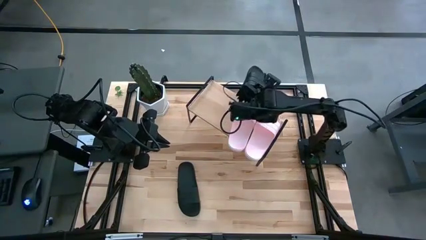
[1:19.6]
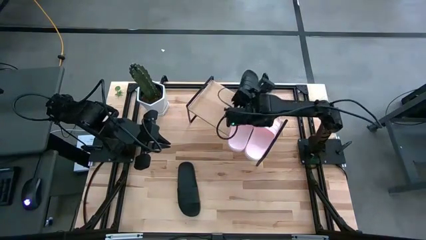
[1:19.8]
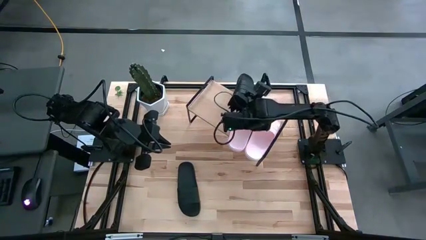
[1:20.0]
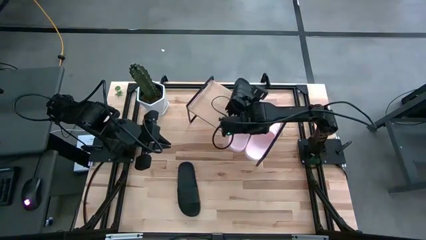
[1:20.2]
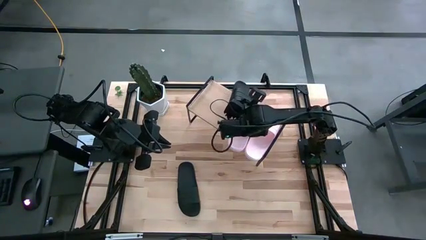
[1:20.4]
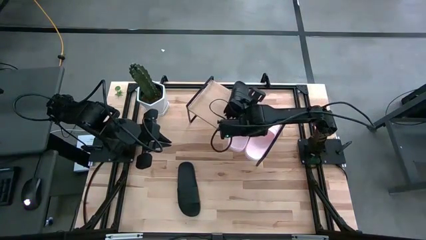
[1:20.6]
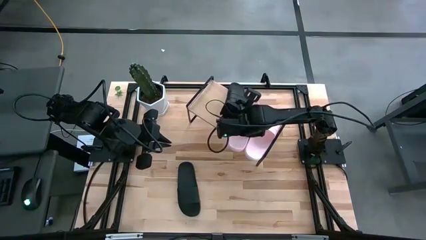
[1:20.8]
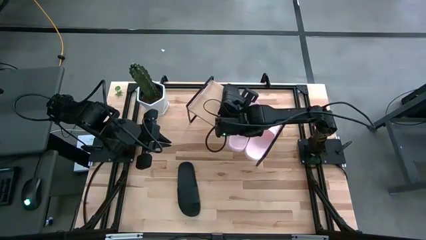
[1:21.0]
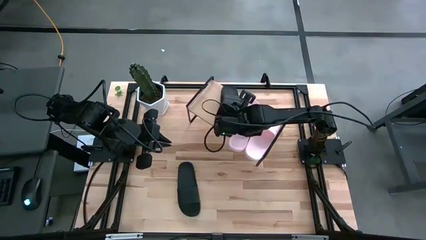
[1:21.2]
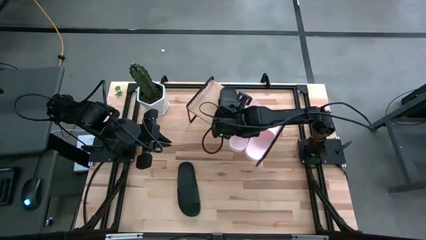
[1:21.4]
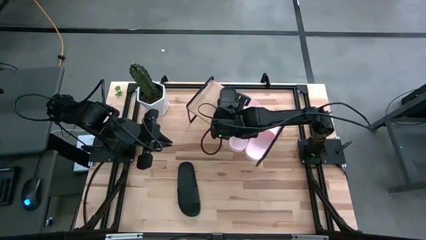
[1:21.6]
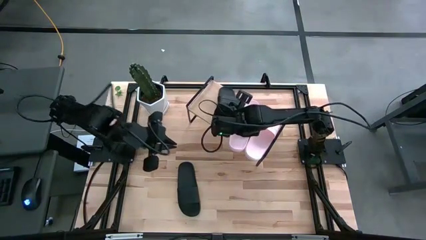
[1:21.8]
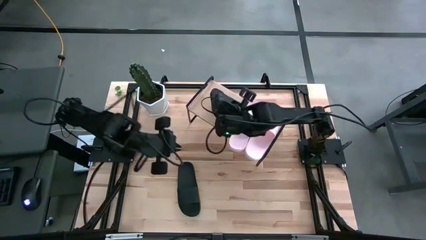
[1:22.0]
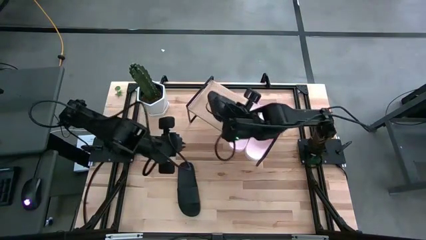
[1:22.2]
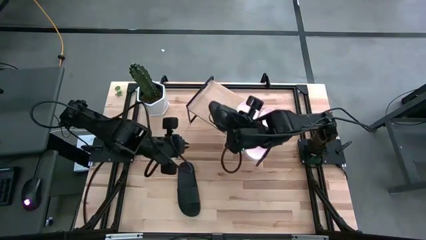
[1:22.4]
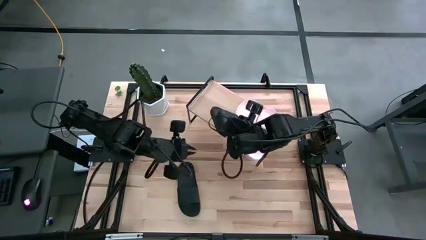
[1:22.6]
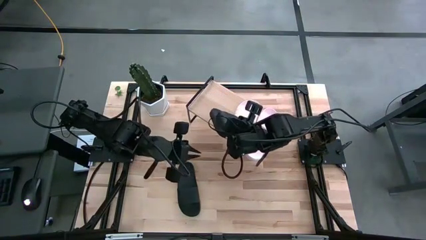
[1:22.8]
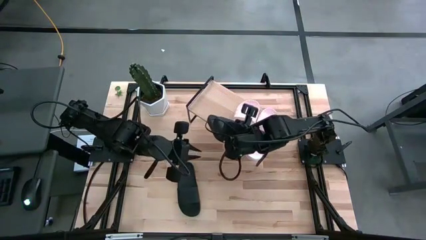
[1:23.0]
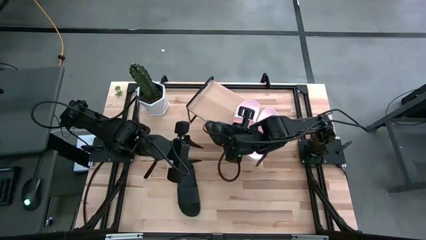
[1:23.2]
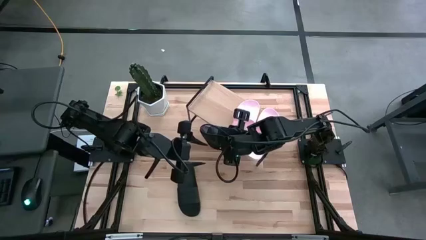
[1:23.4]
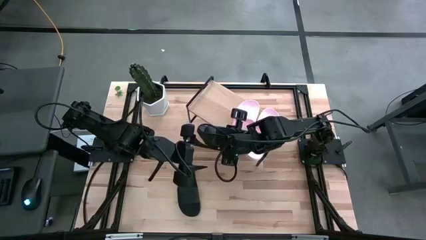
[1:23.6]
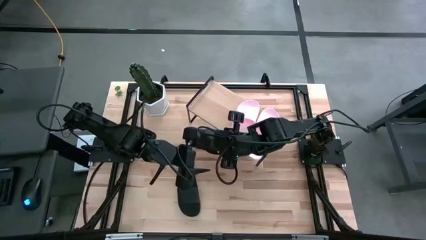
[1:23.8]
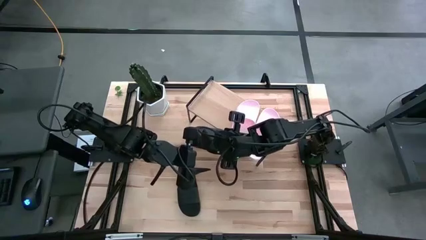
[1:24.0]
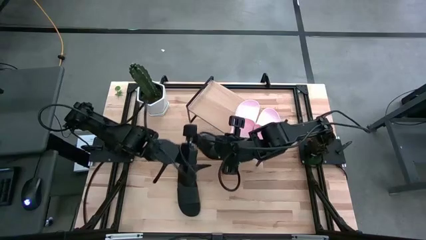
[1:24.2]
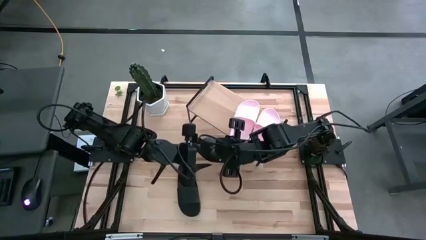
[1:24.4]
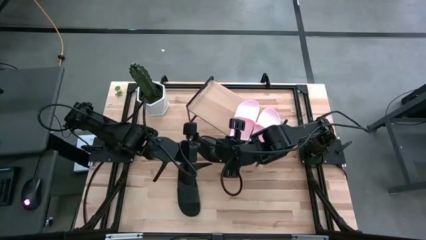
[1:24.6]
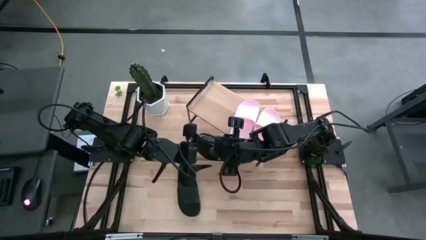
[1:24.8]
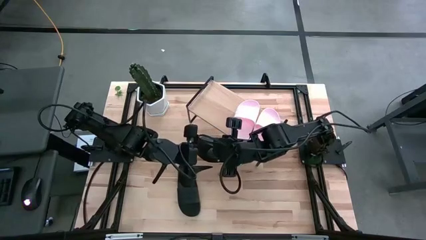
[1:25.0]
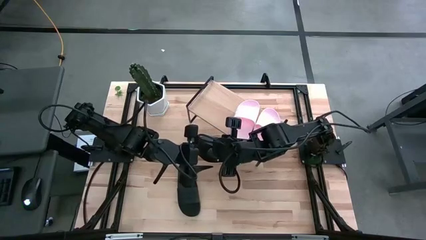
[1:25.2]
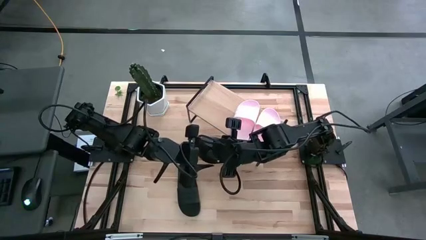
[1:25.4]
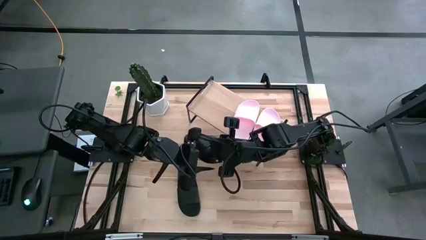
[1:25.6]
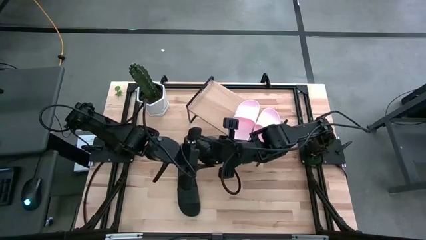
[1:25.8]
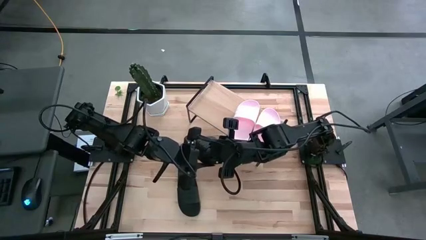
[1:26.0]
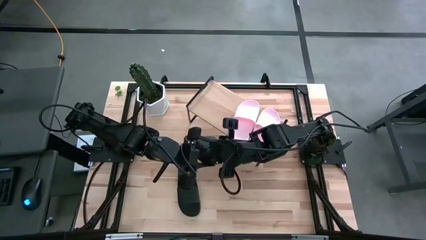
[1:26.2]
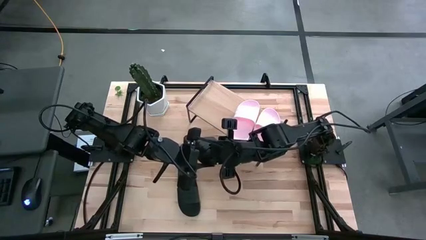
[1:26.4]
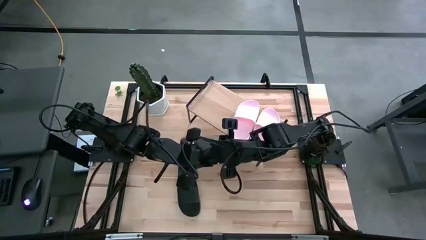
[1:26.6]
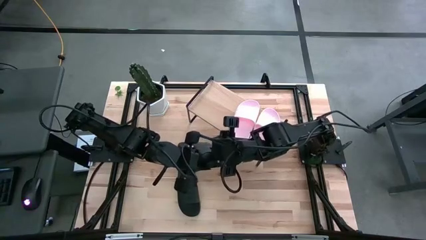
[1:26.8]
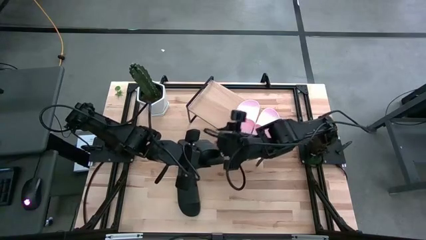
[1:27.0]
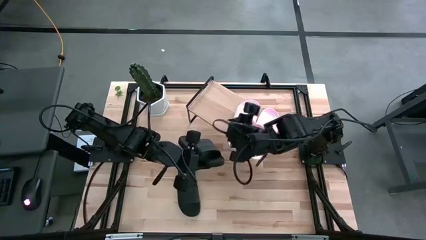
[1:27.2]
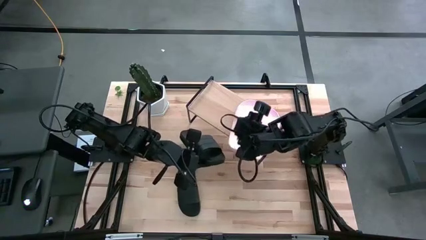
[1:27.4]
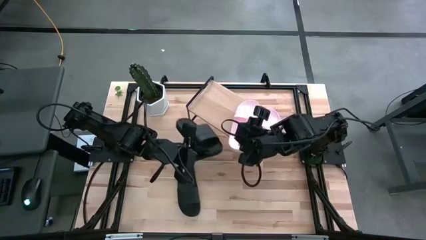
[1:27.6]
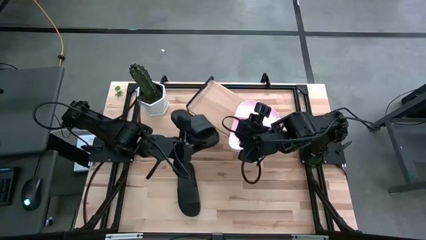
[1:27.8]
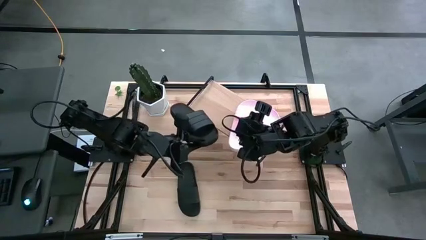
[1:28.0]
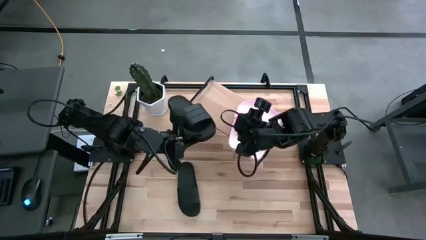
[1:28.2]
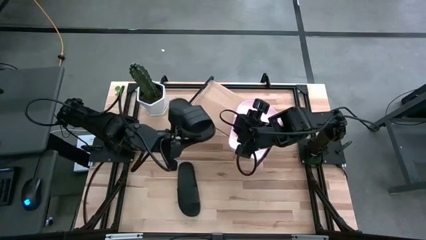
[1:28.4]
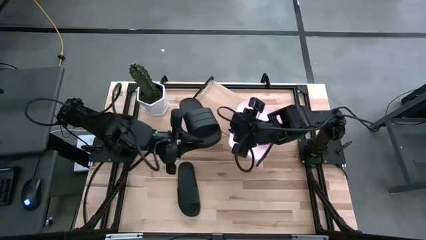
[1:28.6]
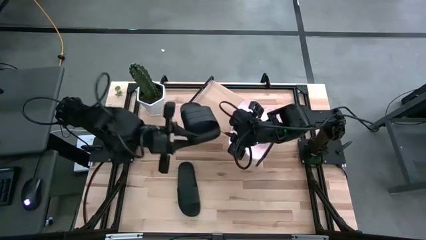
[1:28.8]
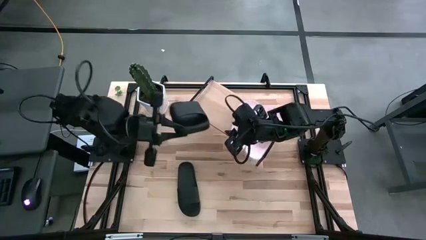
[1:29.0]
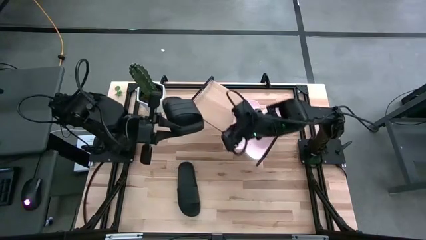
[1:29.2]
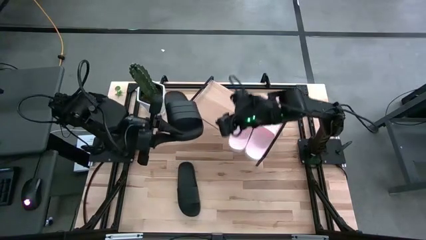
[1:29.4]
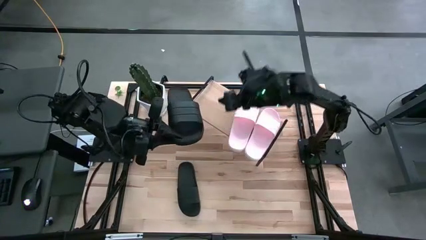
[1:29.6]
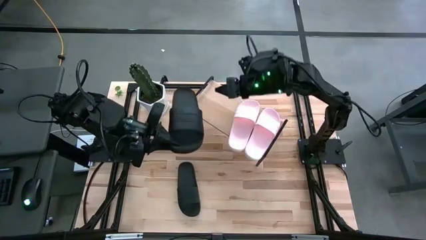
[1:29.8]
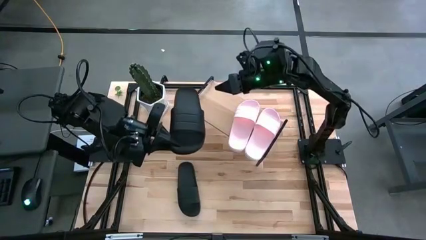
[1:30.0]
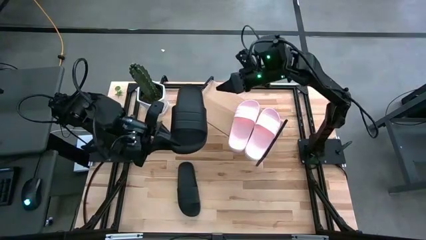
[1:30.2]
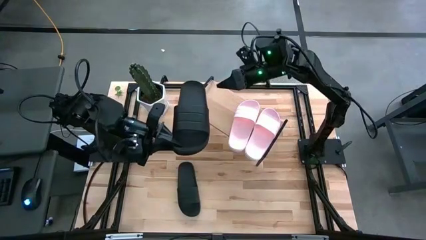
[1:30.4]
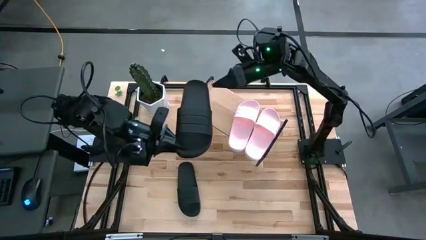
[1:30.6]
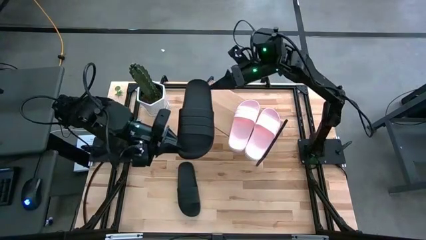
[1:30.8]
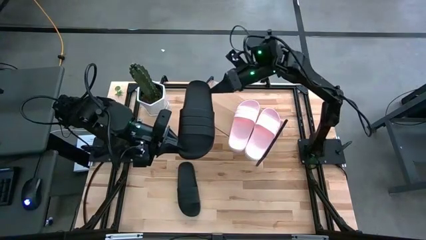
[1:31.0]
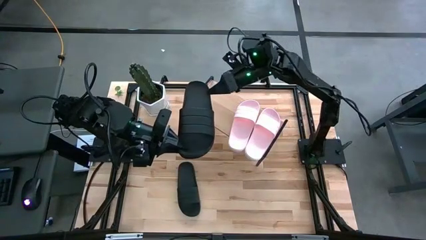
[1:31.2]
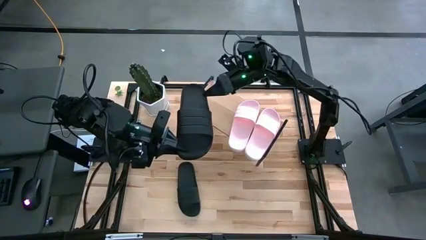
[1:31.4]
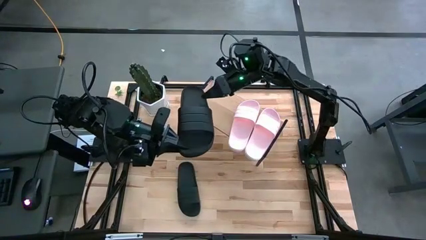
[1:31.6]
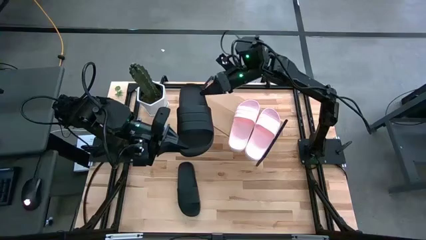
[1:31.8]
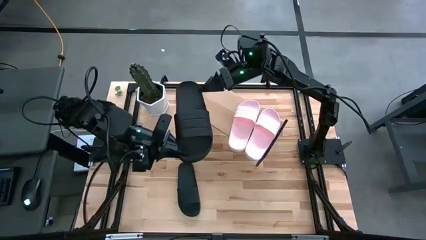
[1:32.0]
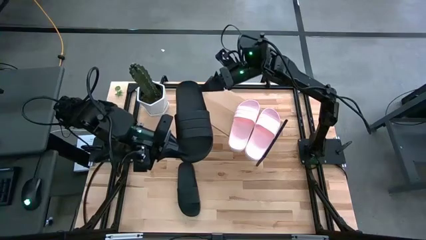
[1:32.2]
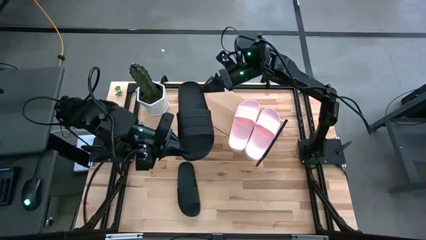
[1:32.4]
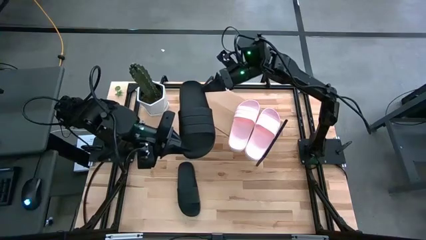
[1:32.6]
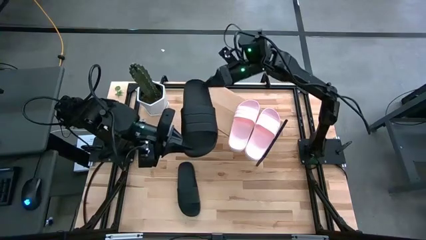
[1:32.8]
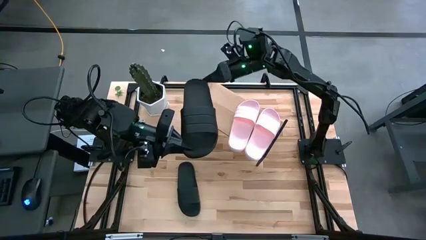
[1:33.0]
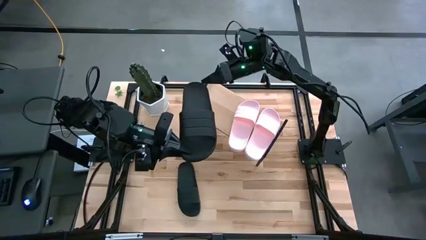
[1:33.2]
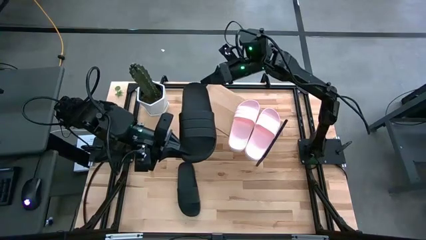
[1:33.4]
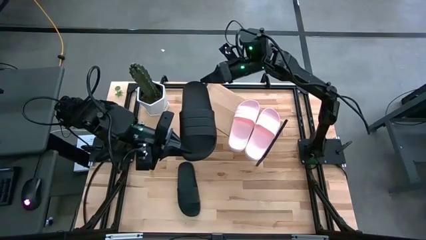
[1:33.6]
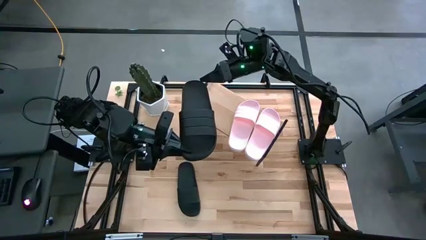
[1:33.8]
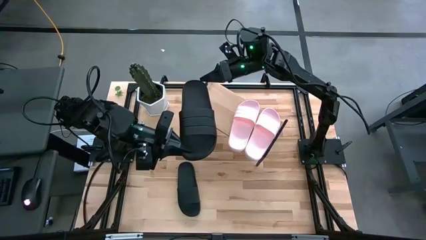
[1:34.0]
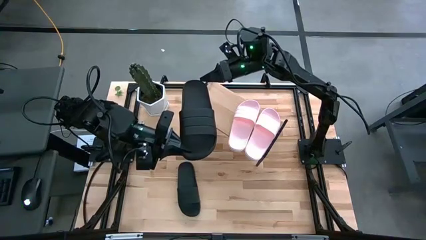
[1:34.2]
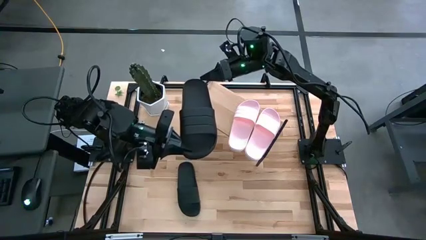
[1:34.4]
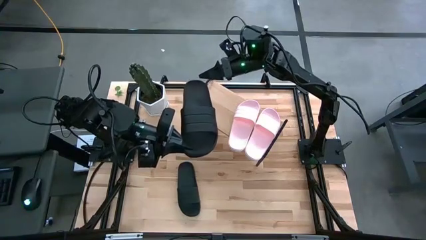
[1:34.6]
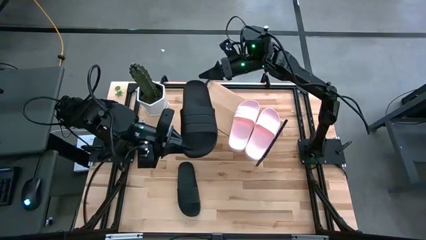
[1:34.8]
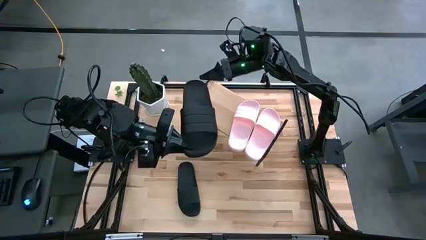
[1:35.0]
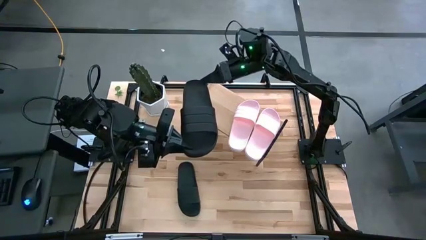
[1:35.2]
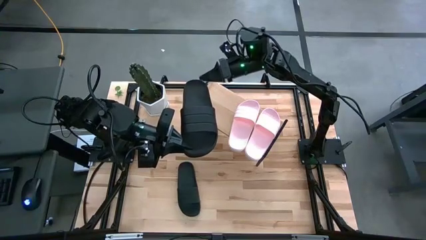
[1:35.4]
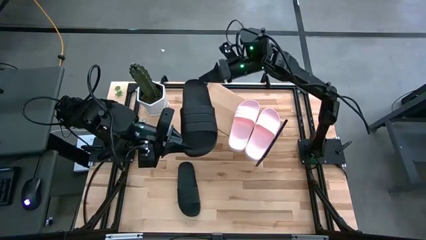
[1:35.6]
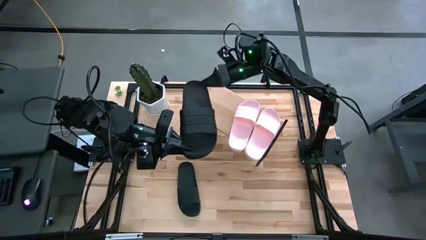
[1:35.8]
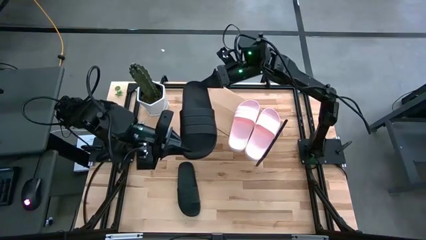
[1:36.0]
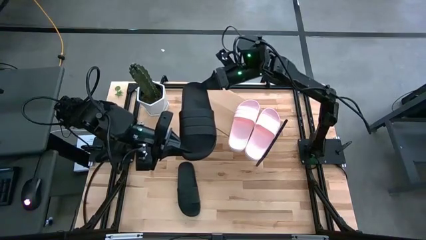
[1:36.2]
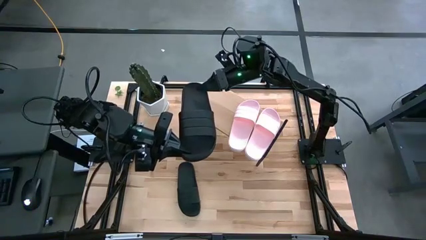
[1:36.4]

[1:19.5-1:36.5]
Task: Pick and place slides into the shelf
Put the right black slipper on the shelf
